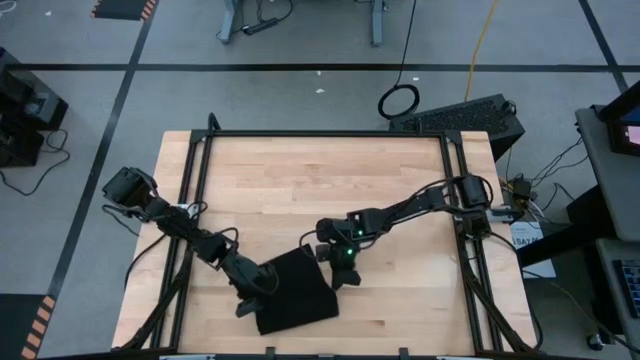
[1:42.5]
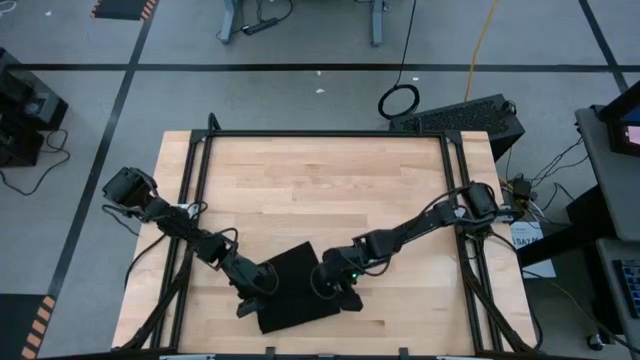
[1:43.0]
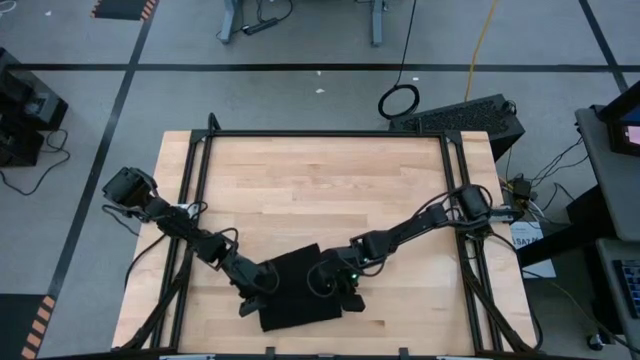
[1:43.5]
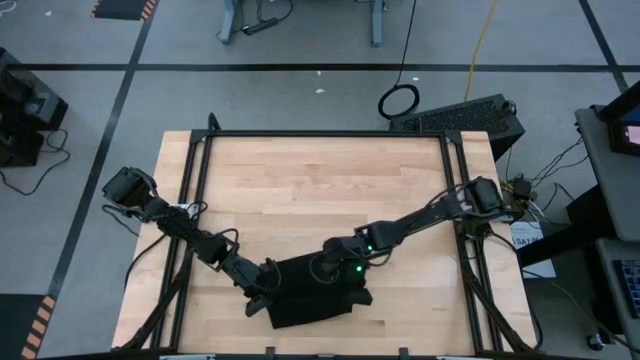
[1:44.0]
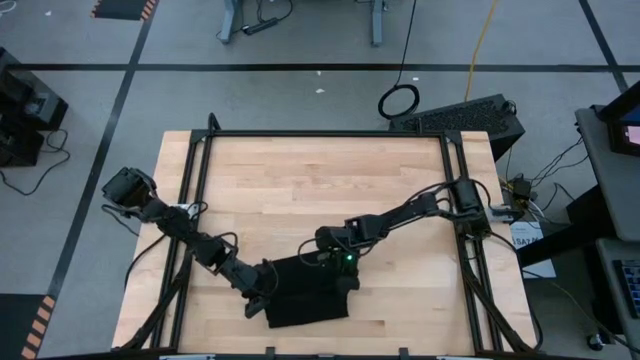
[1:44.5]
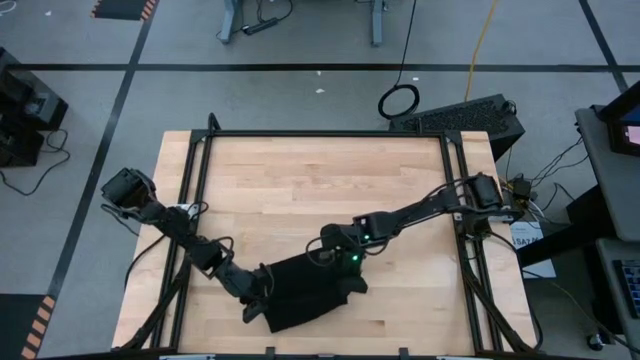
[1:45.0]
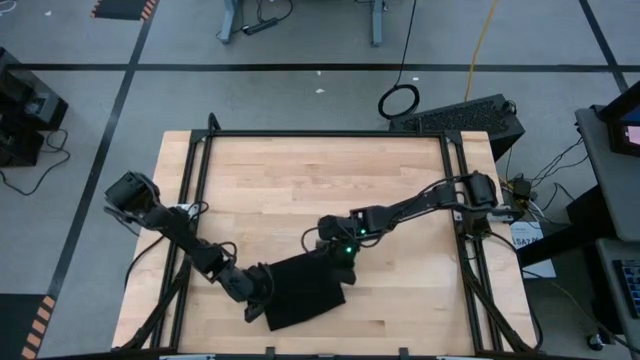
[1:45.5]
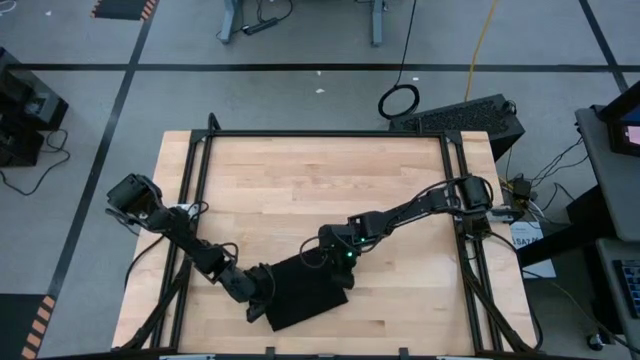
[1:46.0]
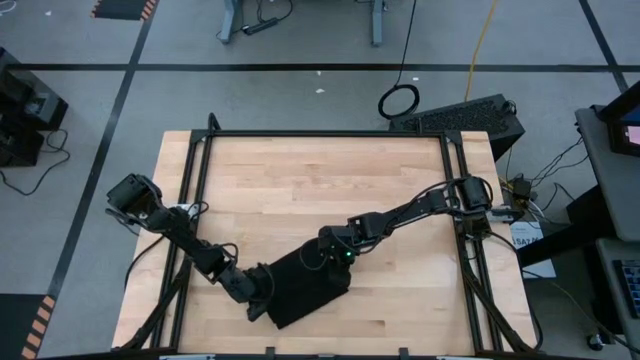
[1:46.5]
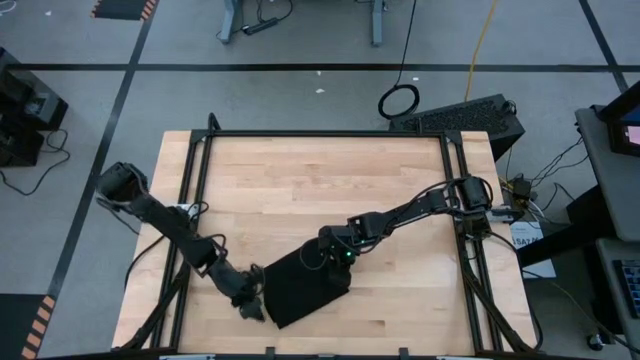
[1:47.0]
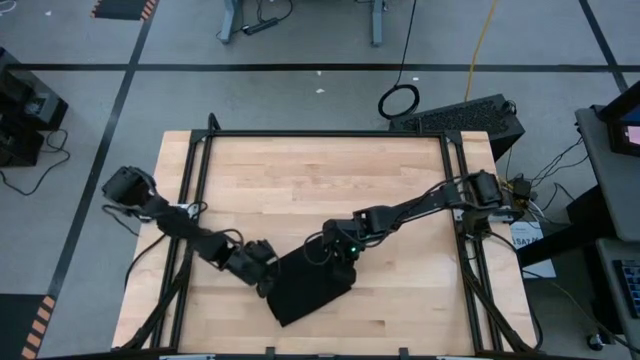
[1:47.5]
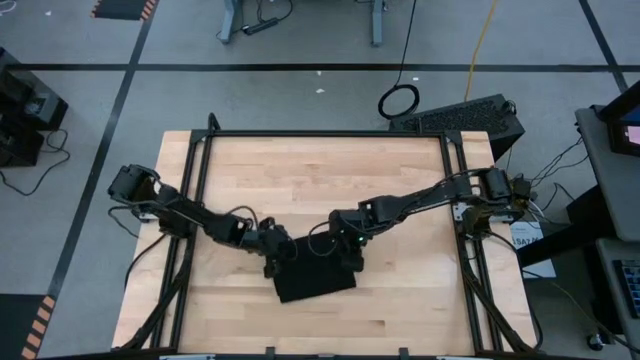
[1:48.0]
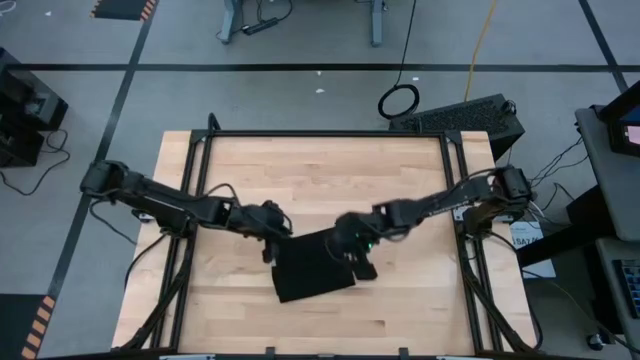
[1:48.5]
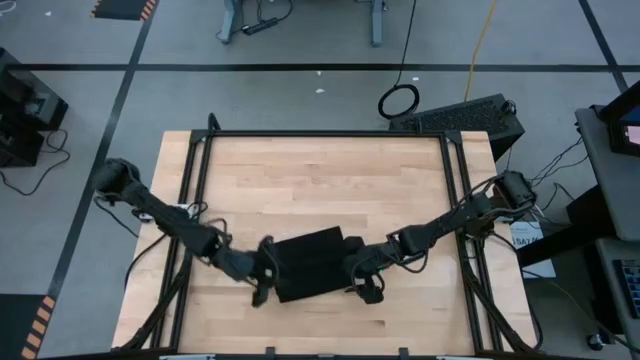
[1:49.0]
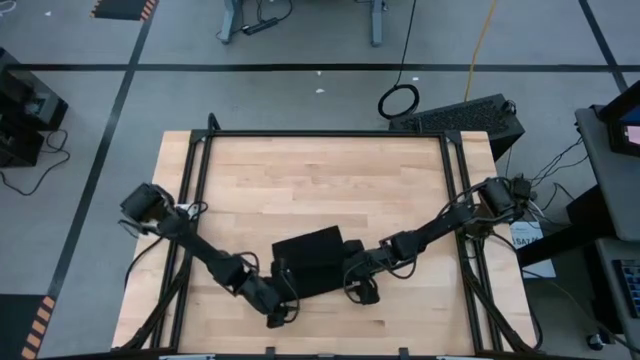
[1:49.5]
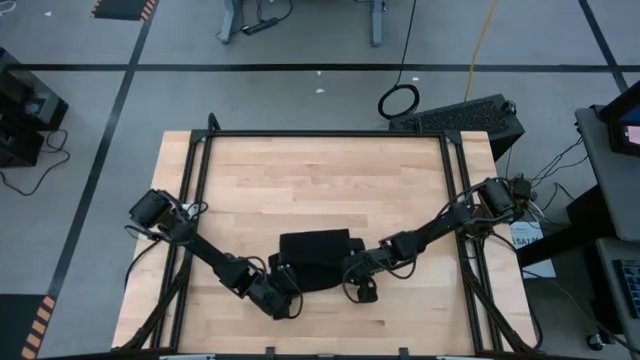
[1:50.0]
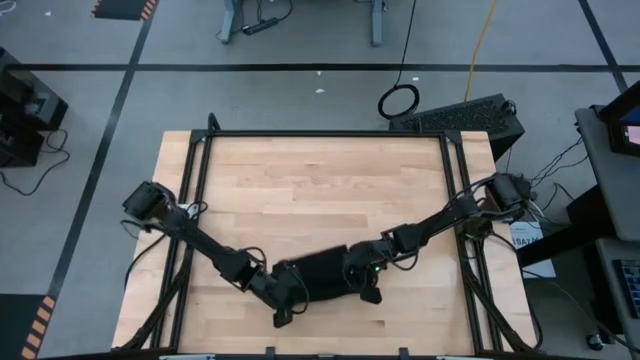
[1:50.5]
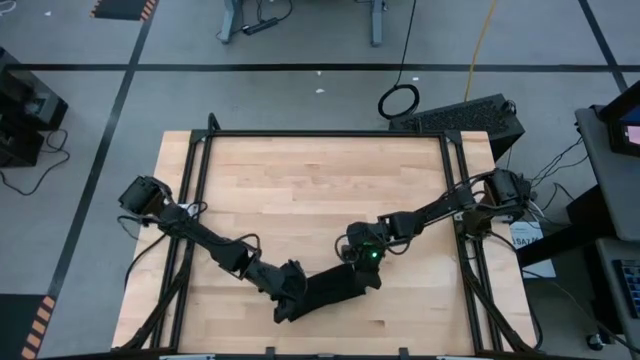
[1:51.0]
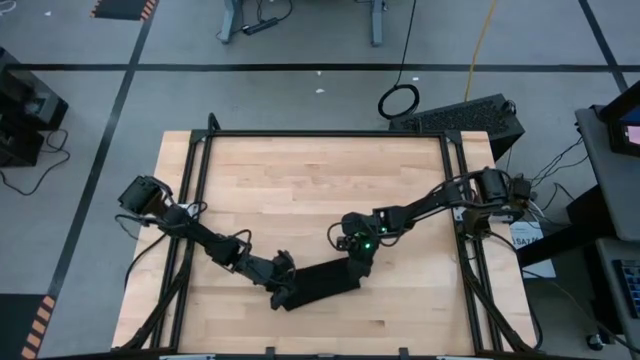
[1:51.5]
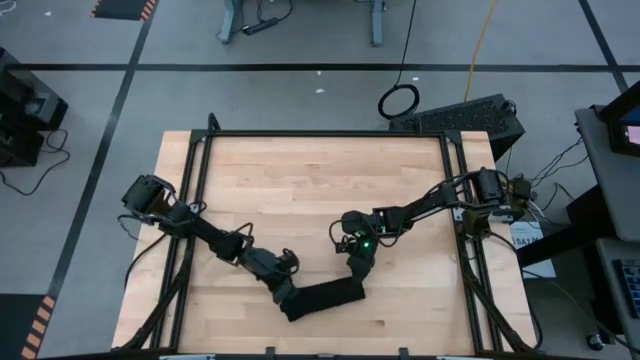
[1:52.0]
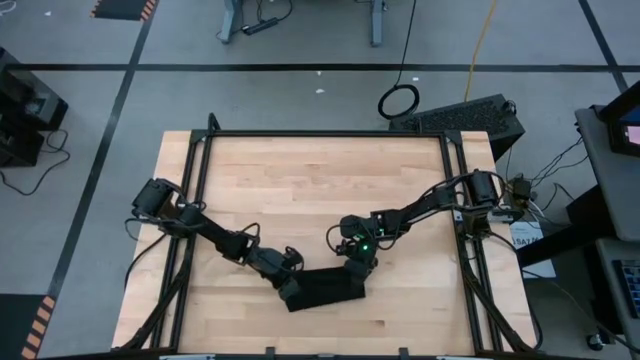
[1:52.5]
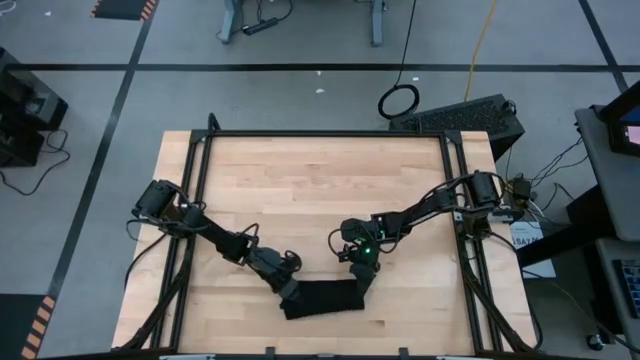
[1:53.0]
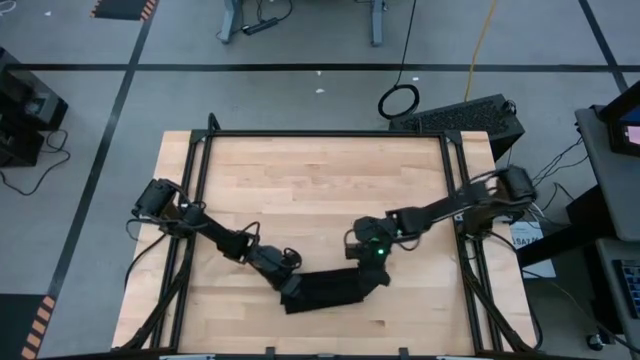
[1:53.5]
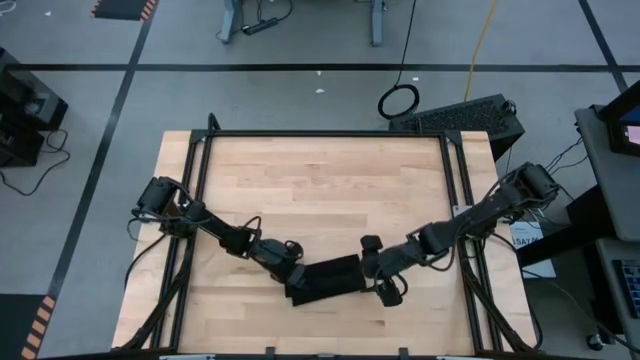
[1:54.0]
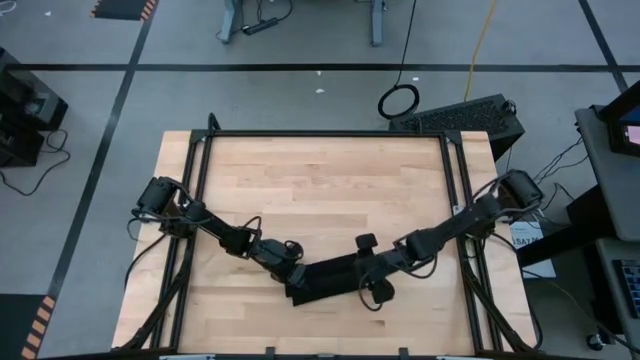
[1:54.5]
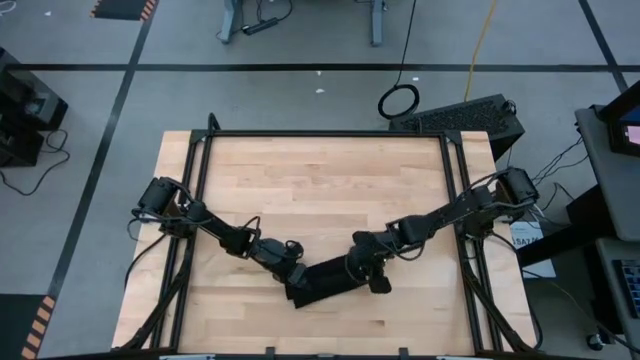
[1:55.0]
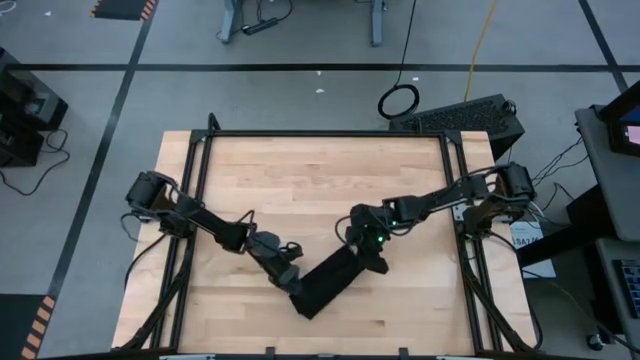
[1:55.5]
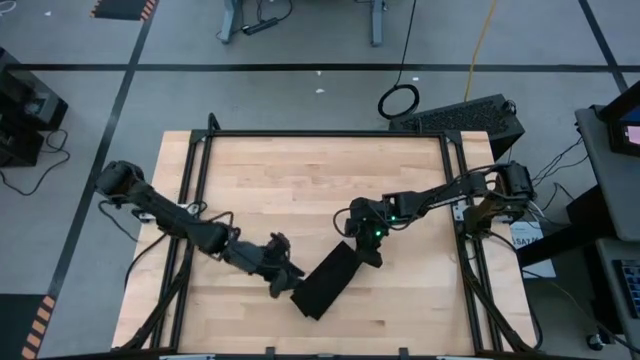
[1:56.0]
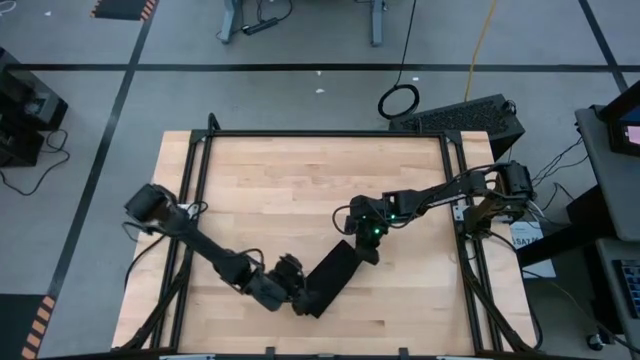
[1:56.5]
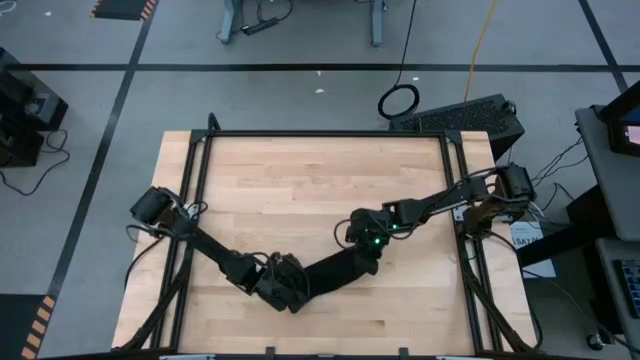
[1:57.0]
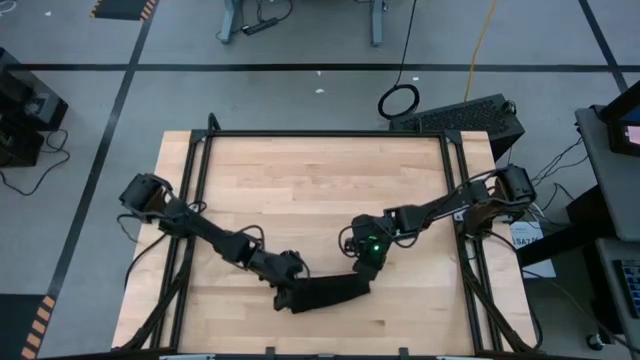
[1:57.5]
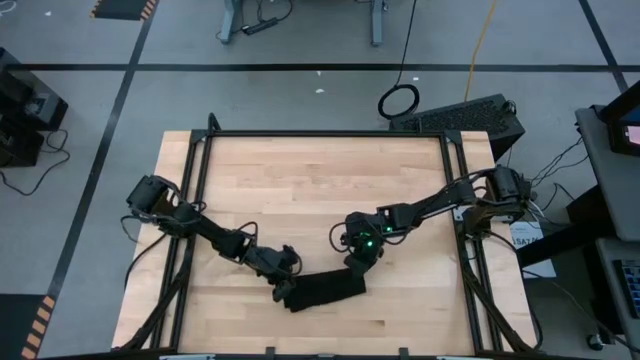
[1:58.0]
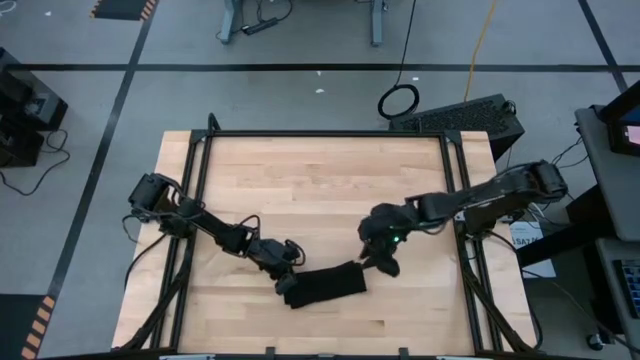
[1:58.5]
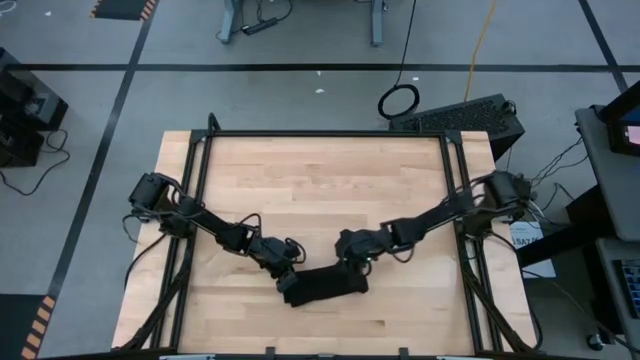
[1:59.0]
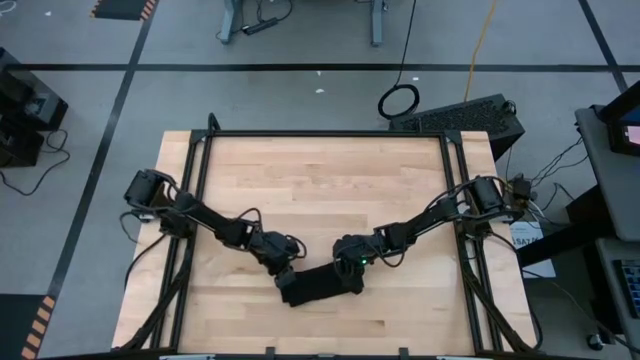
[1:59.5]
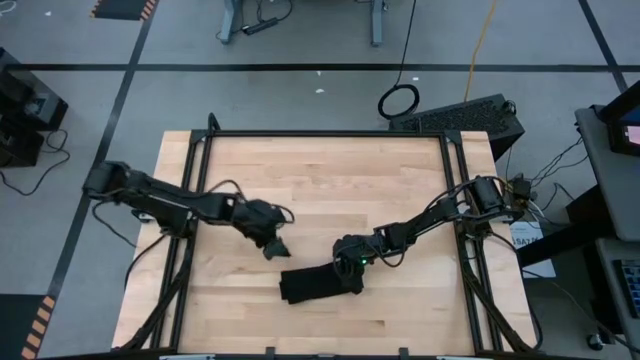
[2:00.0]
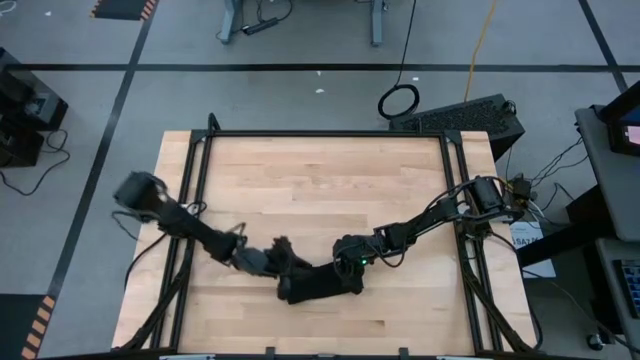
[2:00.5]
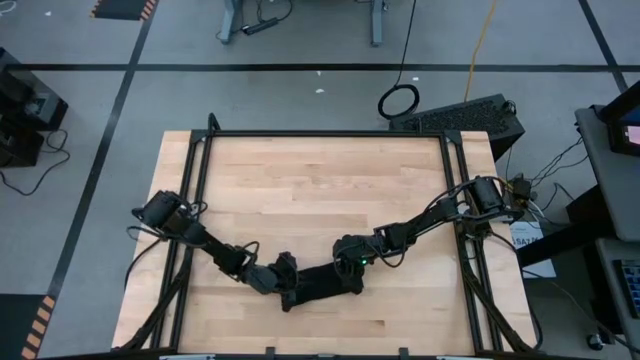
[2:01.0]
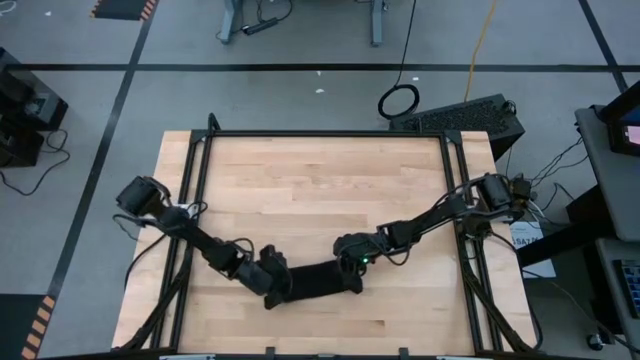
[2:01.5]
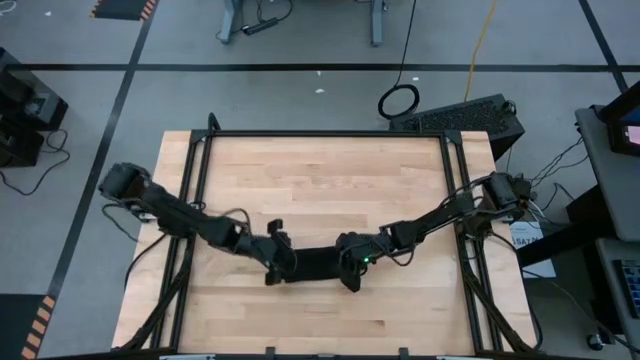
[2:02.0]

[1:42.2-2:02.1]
Task: Roll towel
Roll the black microfiber towel
